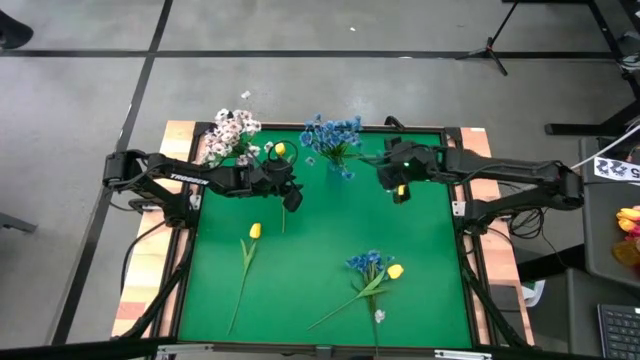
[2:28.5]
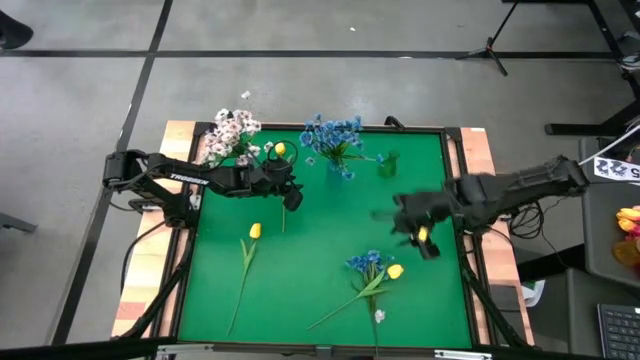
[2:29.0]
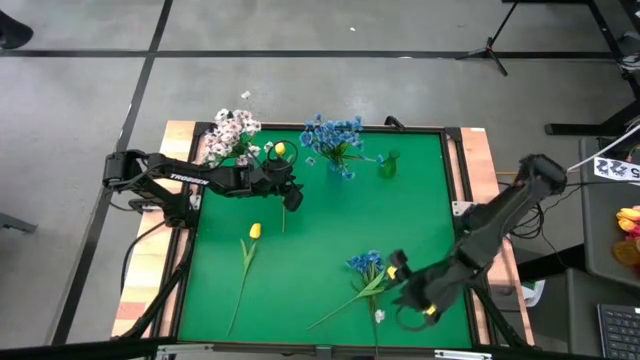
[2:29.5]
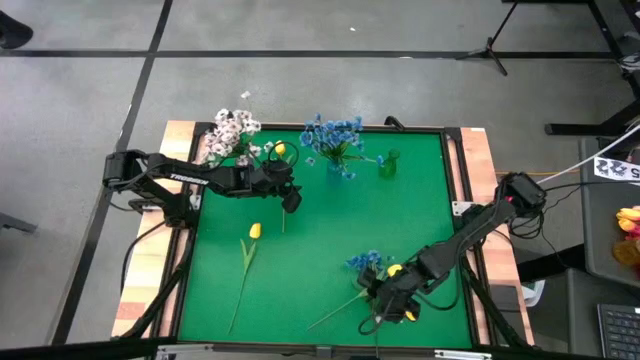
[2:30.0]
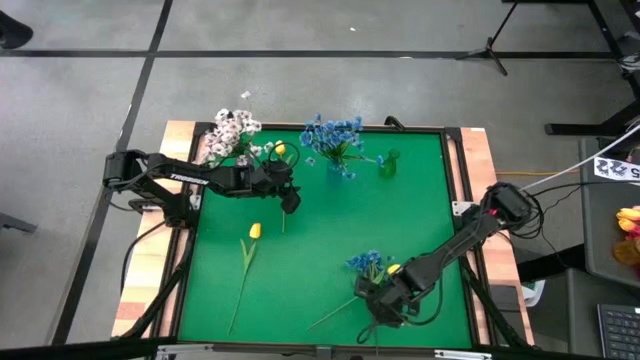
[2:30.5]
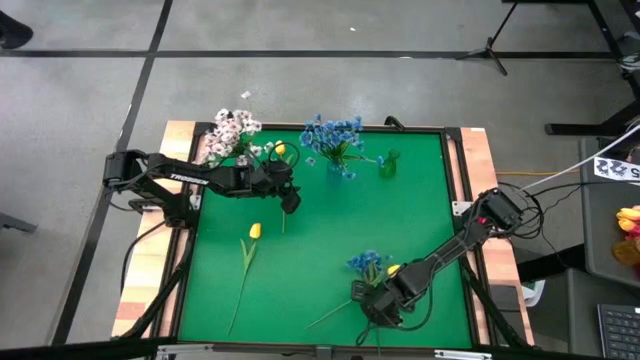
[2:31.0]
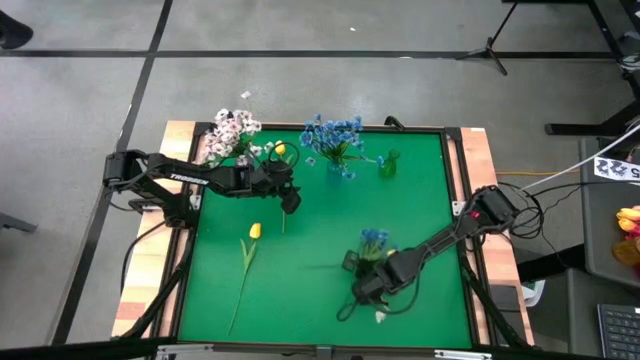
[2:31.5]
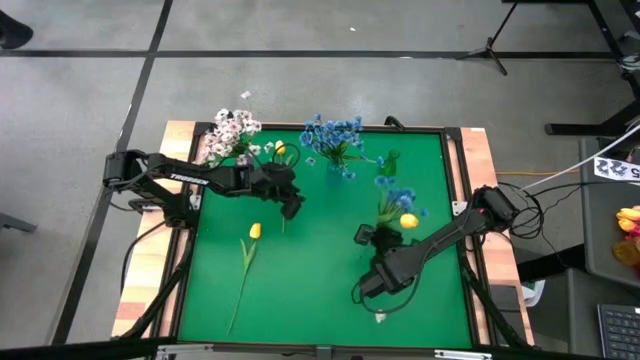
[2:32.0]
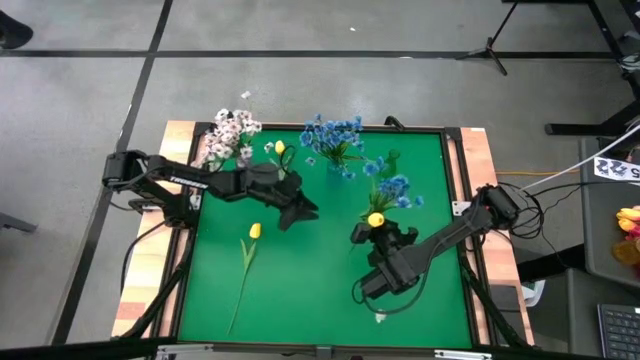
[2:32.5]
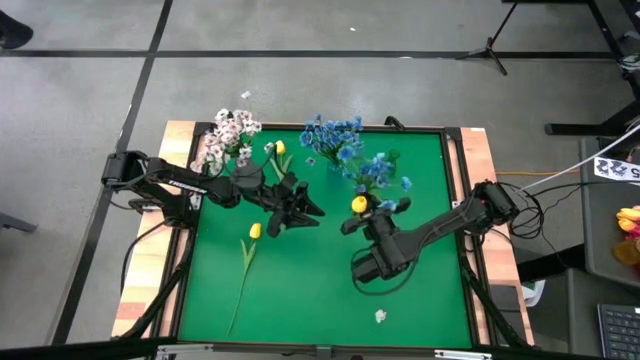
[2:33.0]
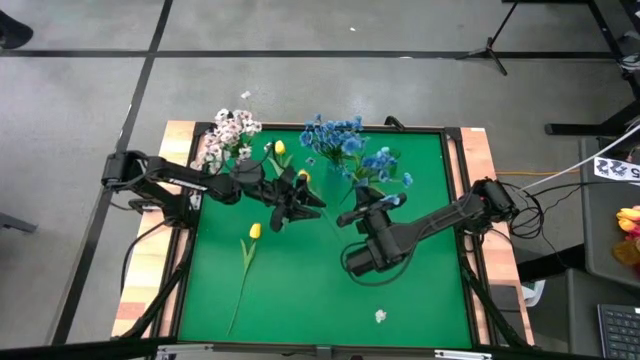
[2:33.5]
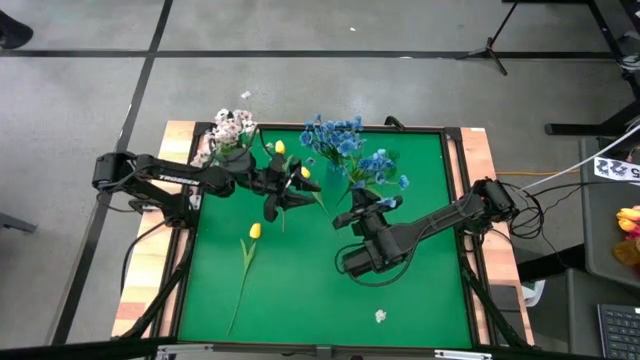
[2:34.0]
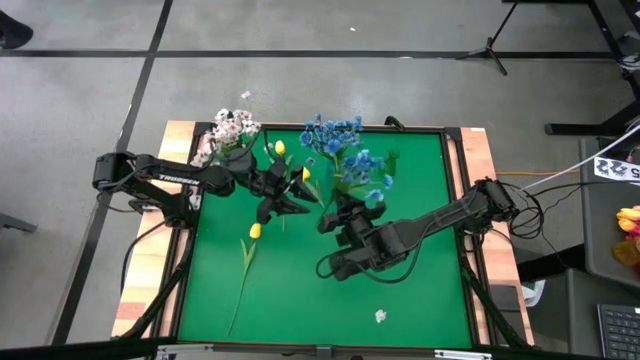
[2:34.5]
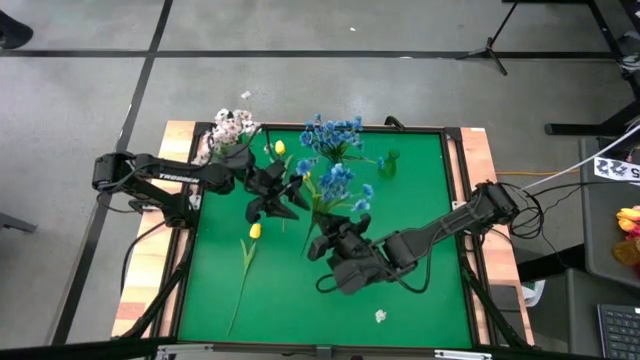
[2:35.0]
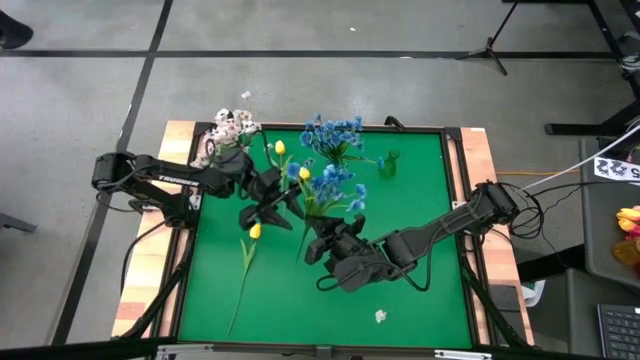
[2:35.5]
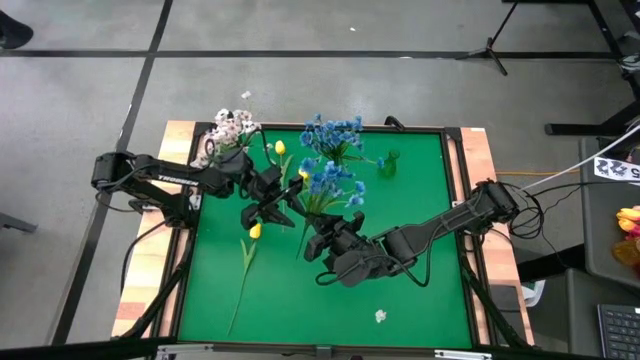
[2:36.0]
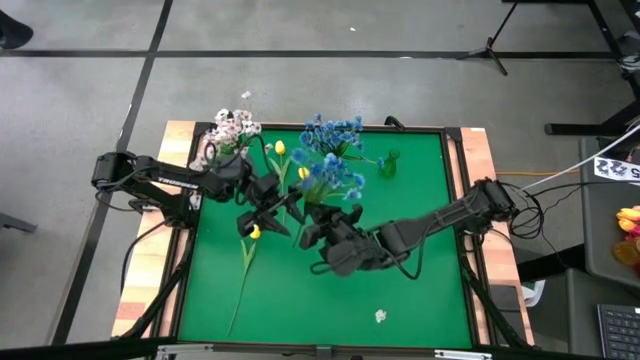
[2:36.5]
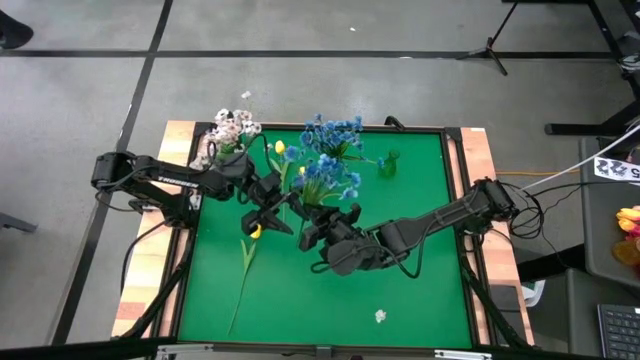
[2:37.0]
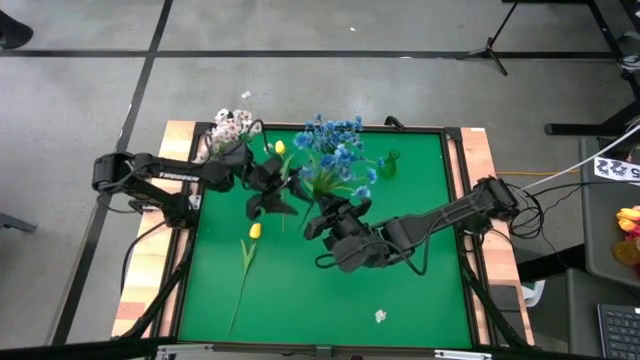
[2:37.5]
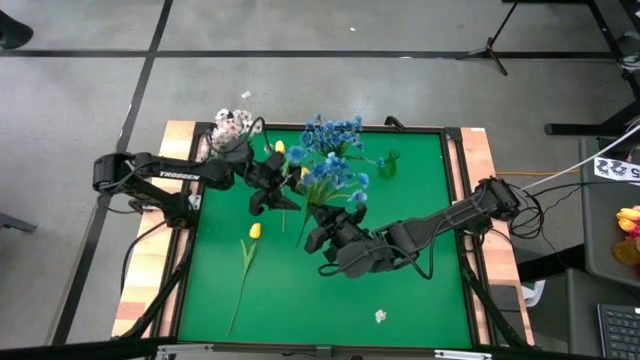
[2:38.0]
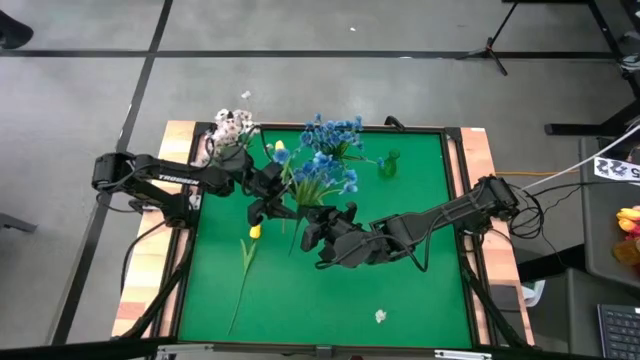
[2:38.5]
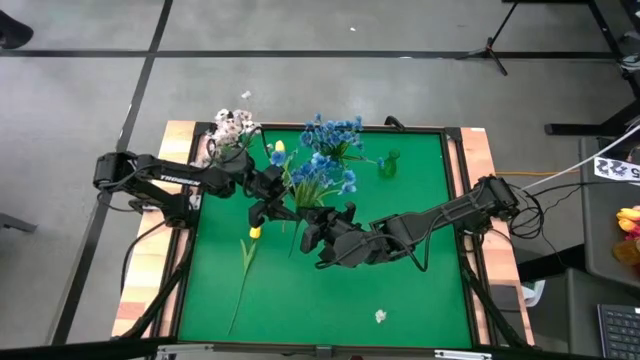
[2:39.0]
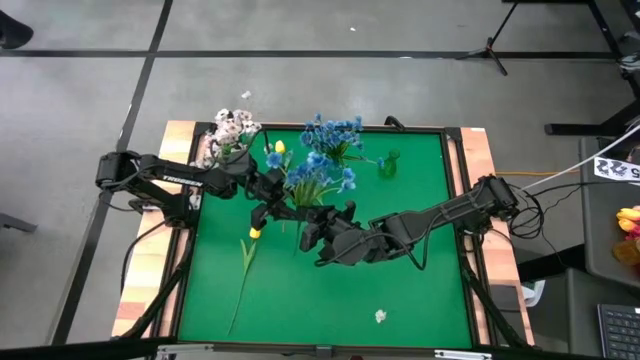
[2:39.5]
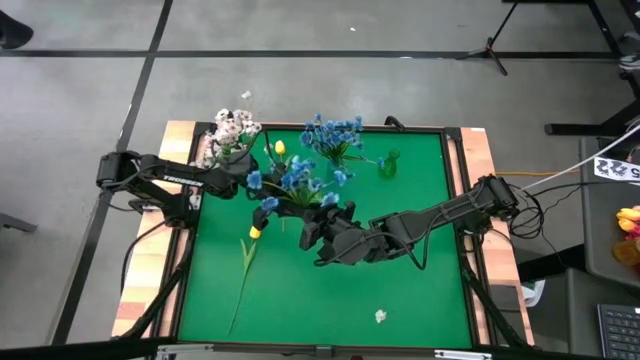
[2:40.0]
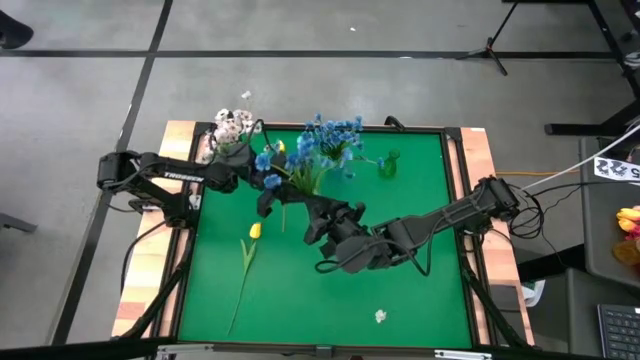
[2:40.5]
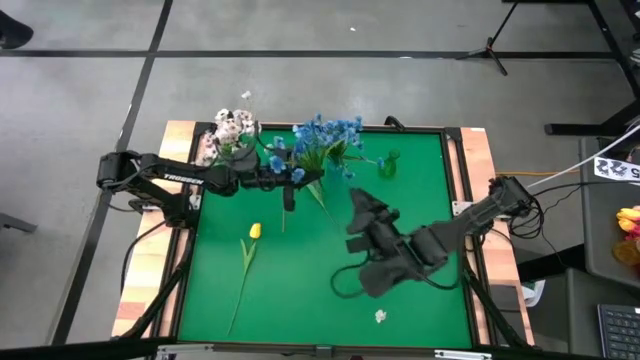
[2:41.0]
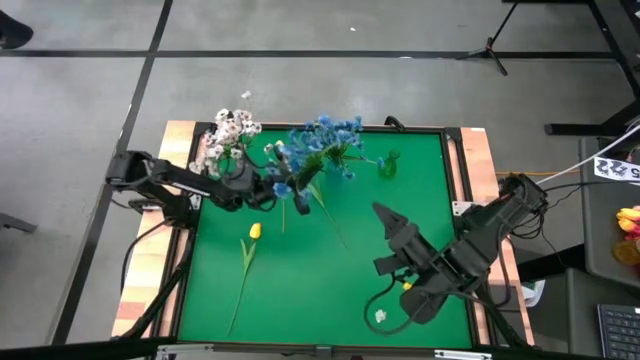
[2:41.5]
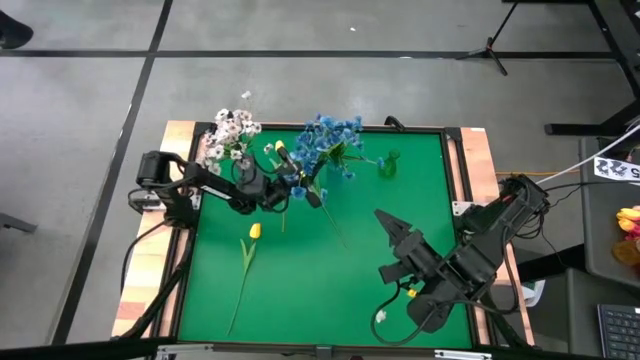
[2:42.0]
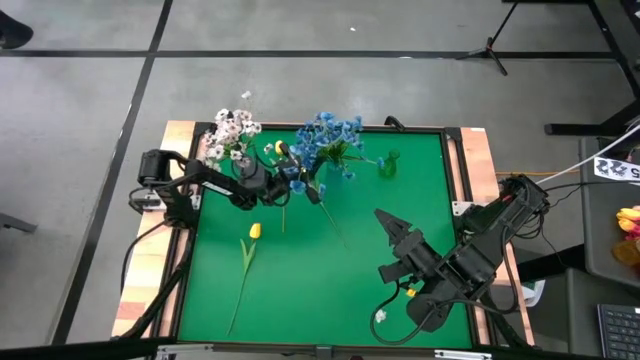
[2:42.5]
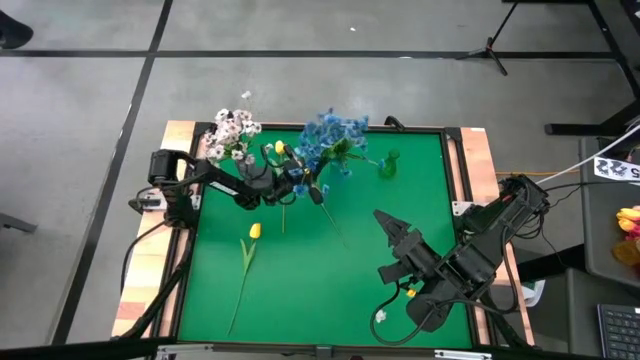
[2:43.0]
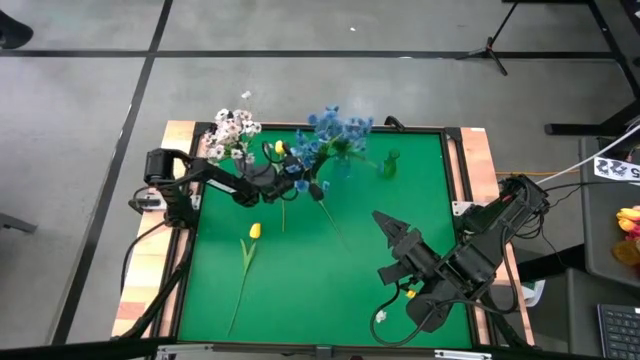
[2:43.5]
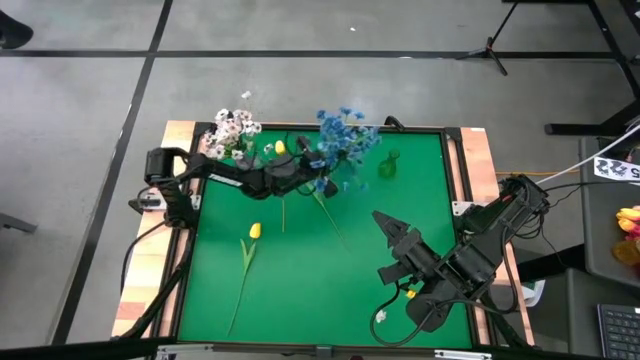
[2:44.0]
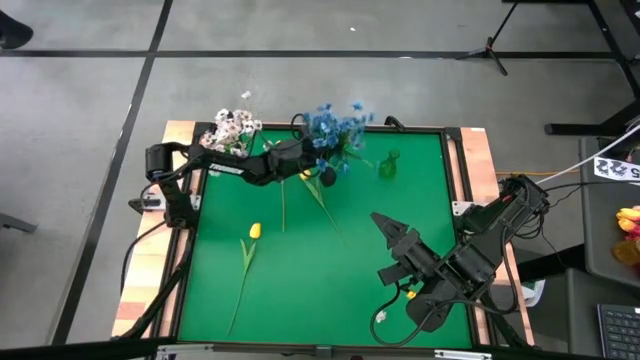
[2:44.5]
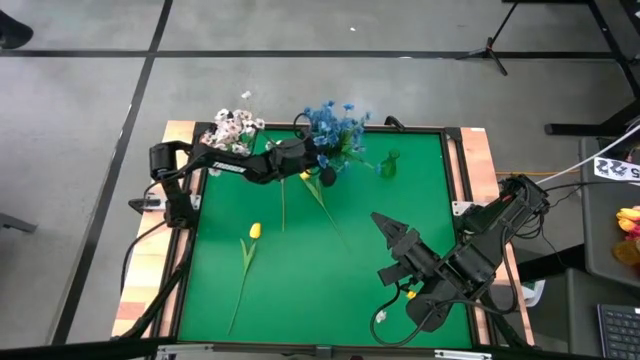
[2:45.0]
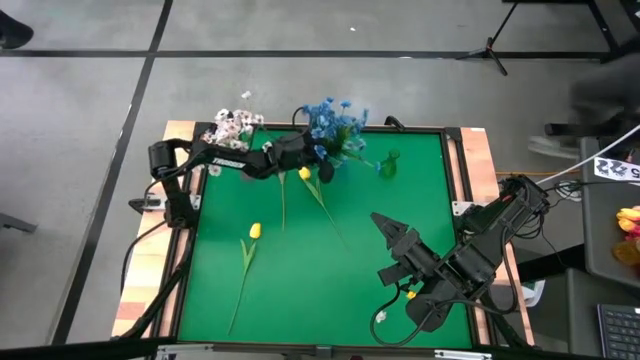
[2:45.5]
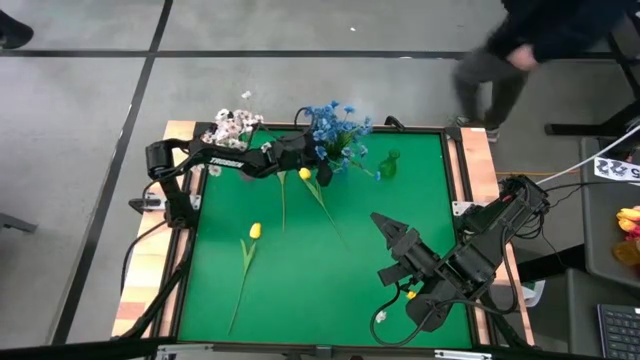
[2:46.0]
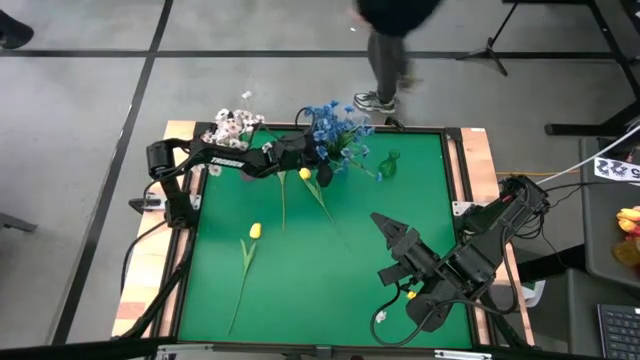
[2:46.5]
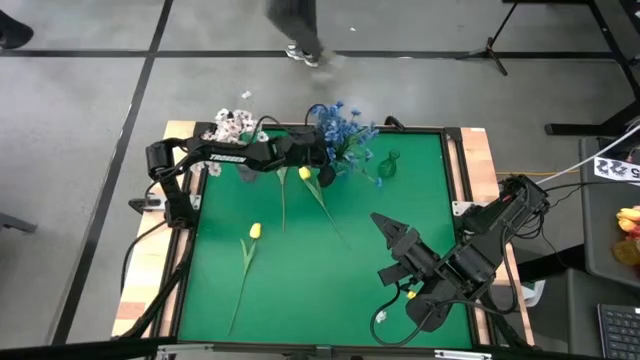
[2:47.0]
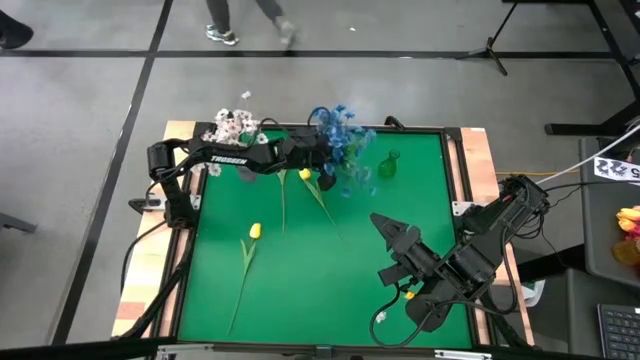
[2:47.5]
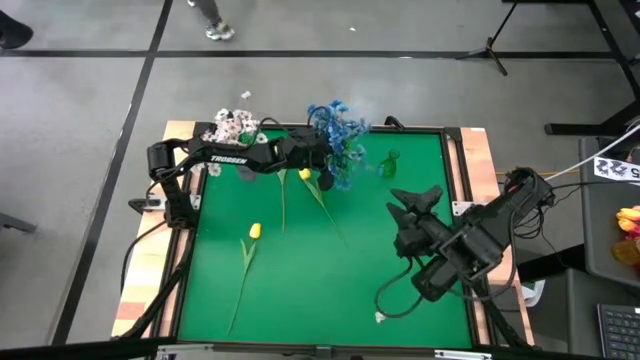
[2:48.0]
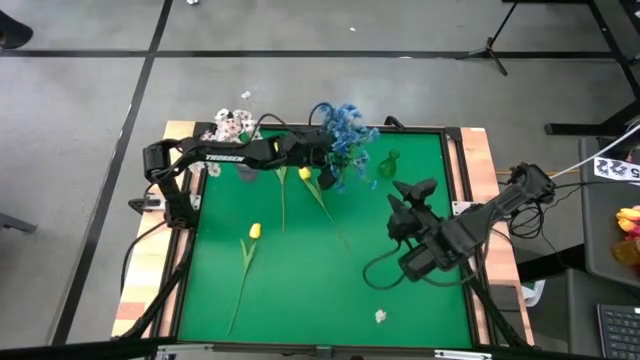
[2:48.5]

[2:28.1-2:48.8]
Task: Sort flowers into vase by color
Put the blue flowers into the blue vase

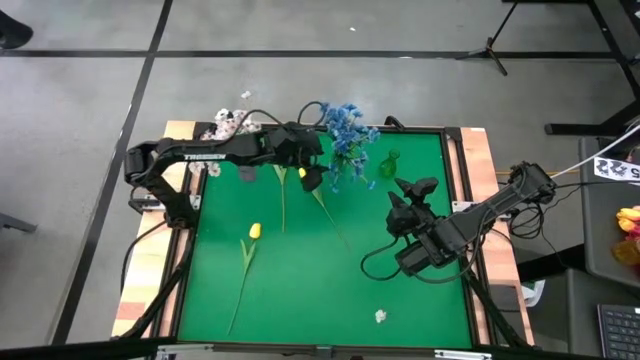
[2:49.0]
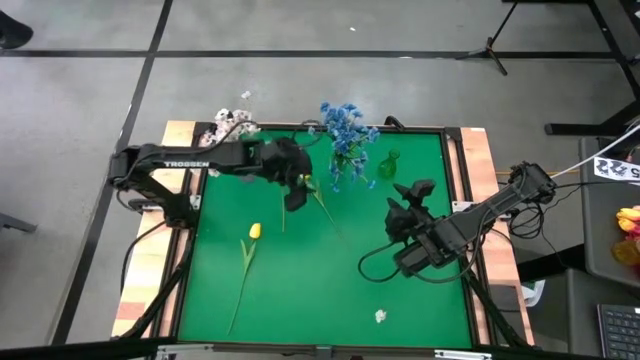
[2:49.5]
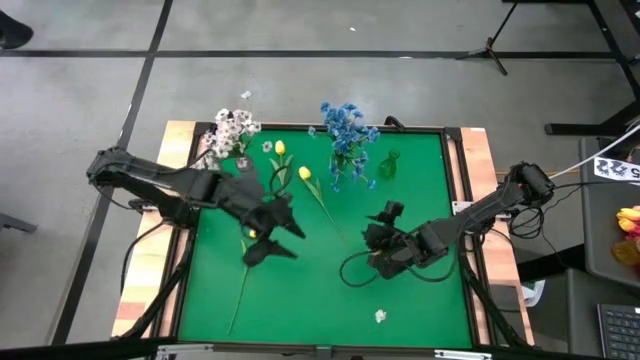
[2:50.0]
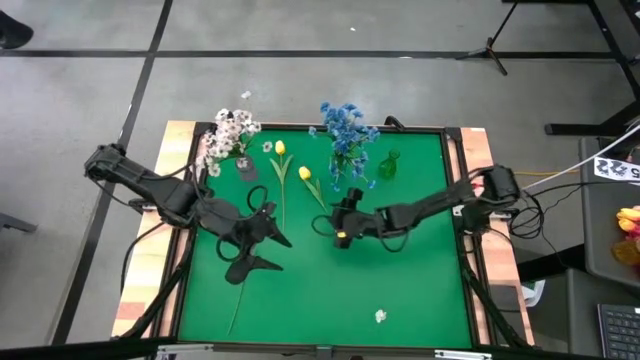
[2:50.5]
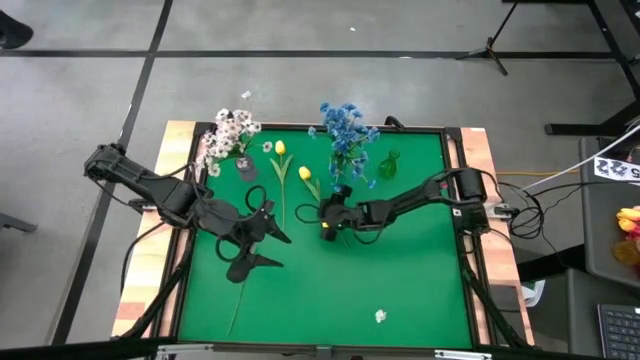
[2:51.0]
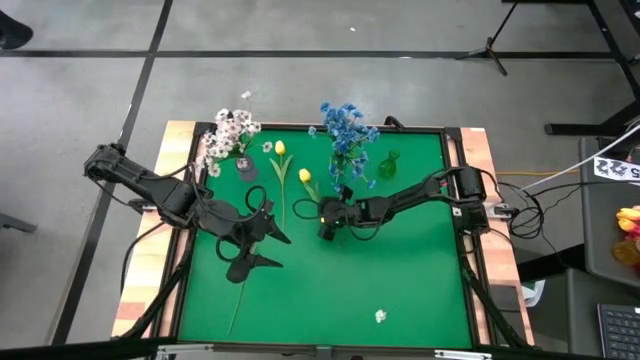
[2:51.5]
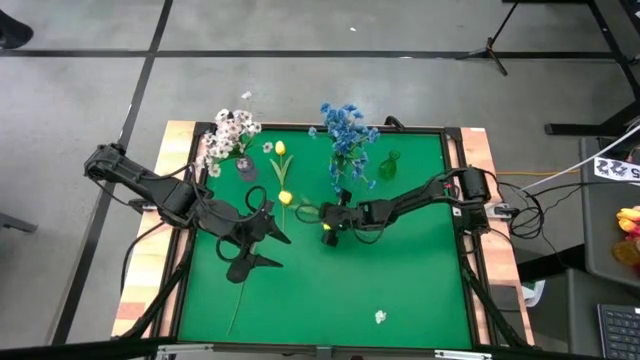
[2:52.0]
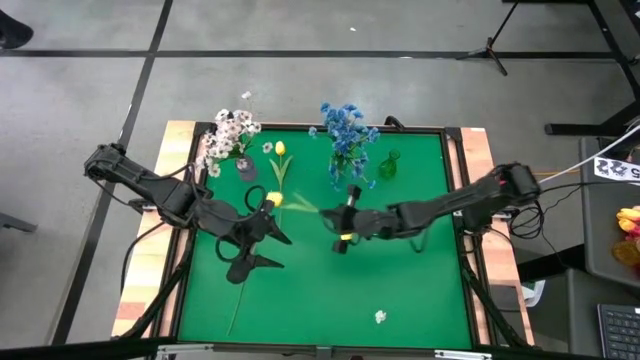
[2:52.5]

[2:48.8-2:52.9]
Put the middle yellow flower into the green vase
